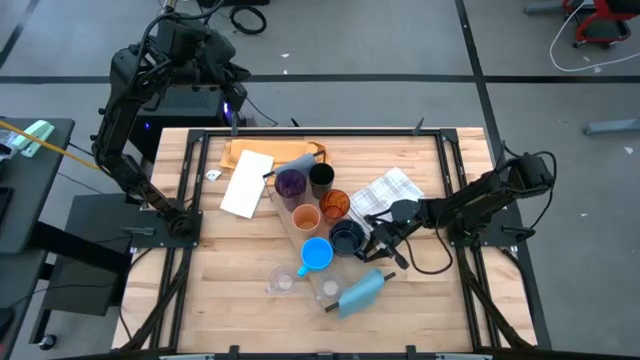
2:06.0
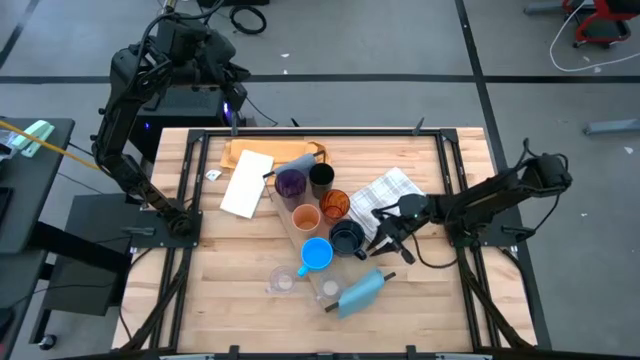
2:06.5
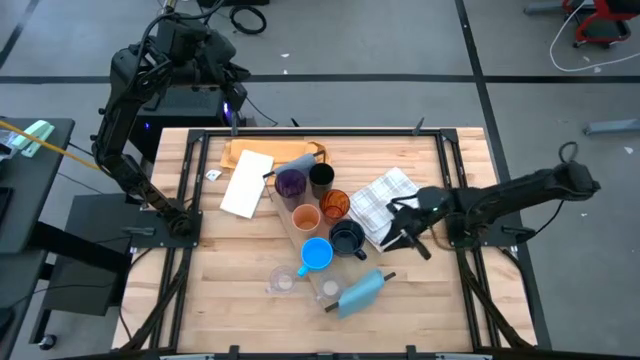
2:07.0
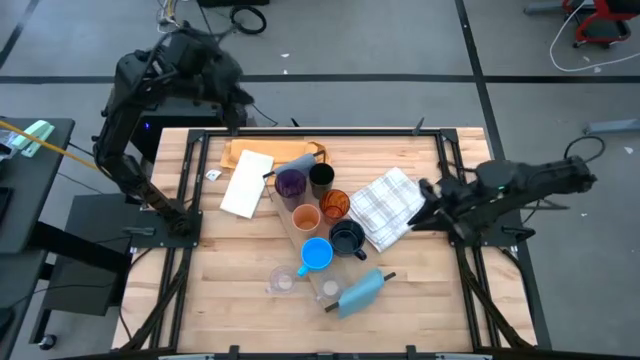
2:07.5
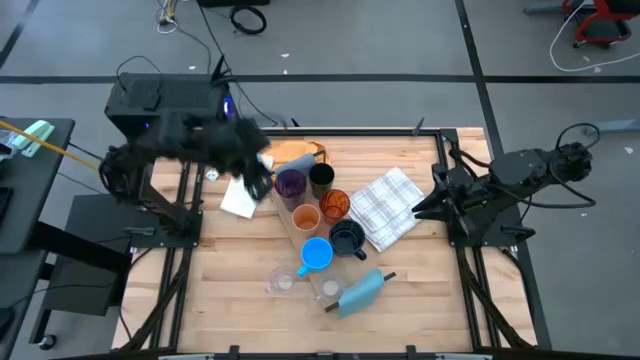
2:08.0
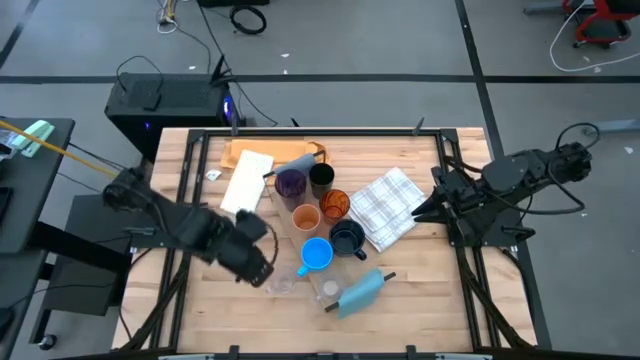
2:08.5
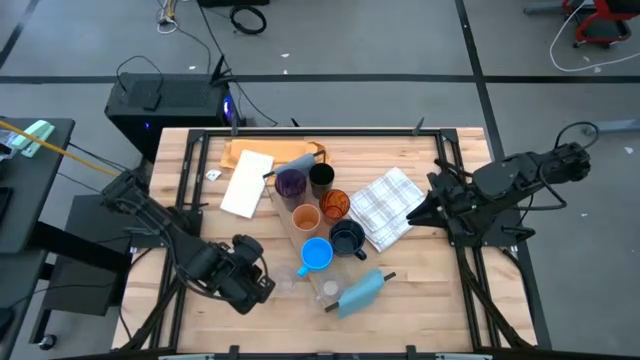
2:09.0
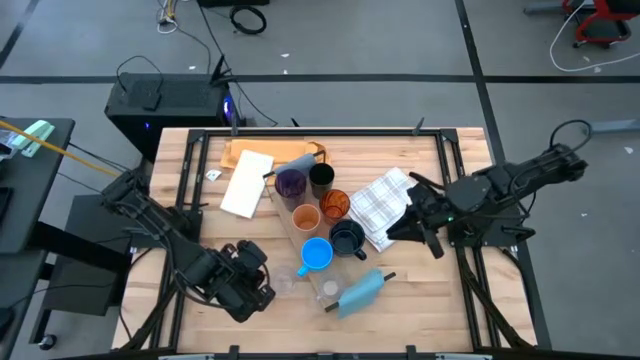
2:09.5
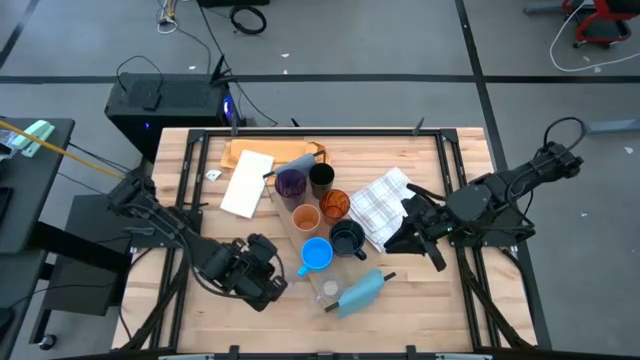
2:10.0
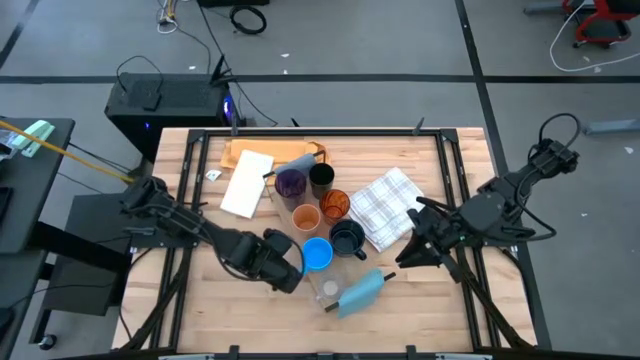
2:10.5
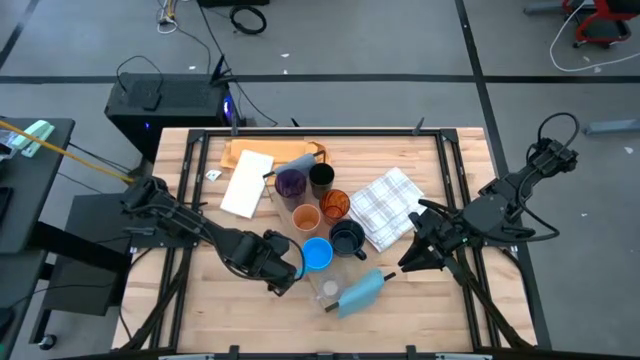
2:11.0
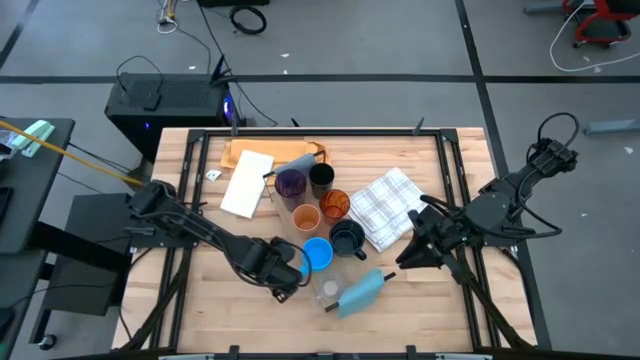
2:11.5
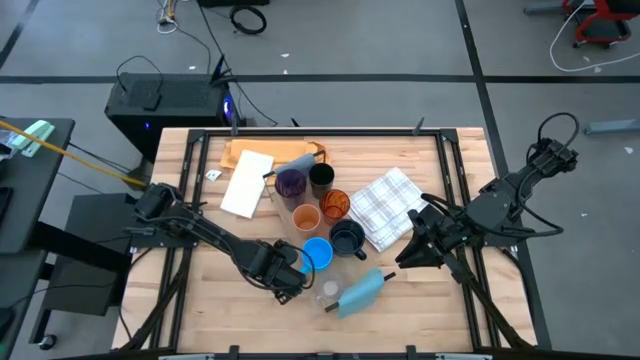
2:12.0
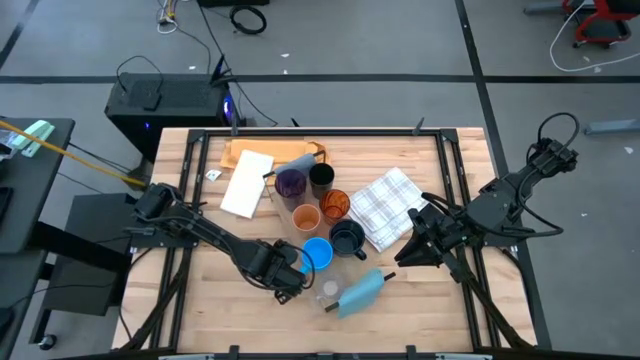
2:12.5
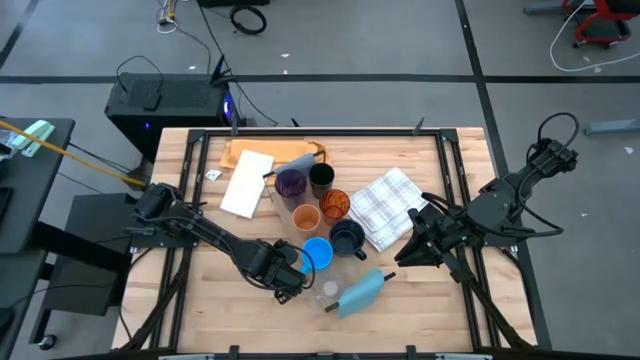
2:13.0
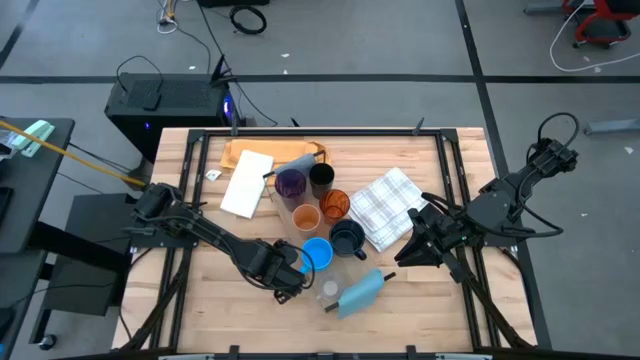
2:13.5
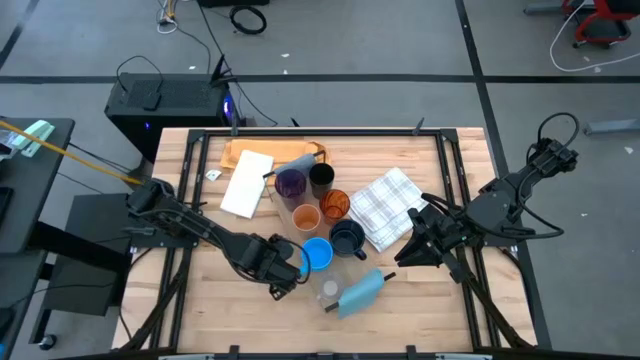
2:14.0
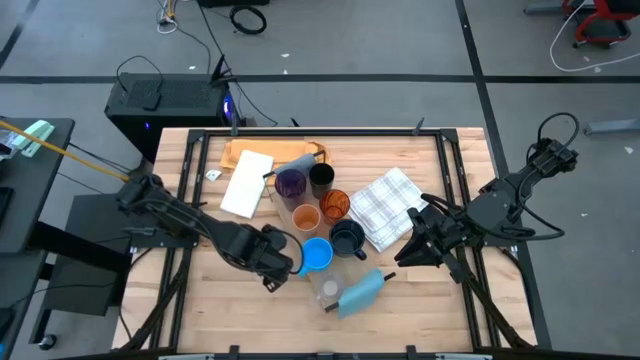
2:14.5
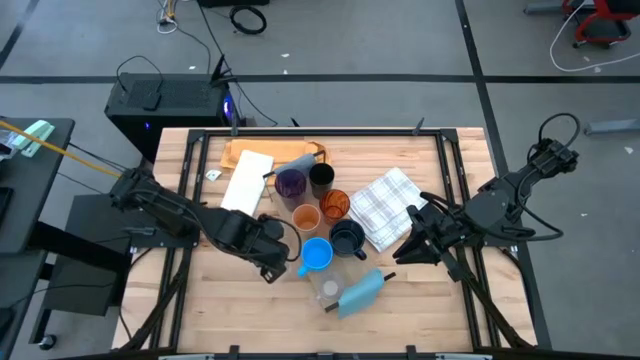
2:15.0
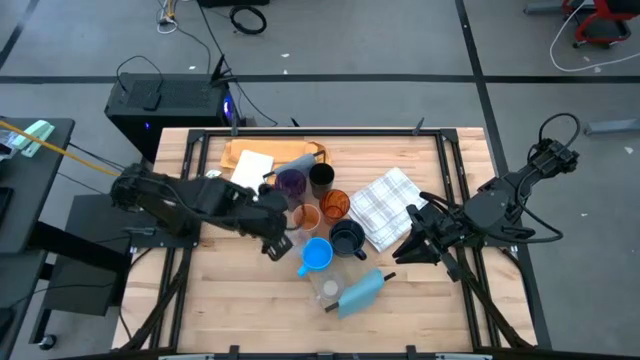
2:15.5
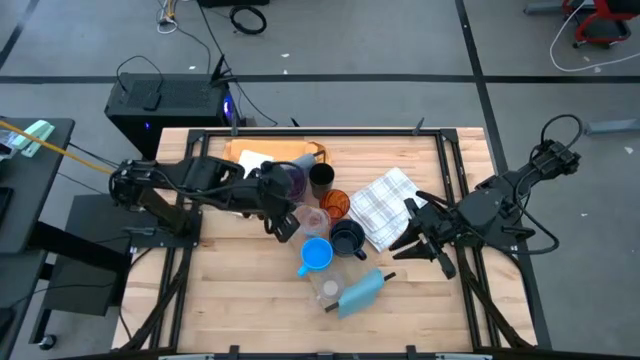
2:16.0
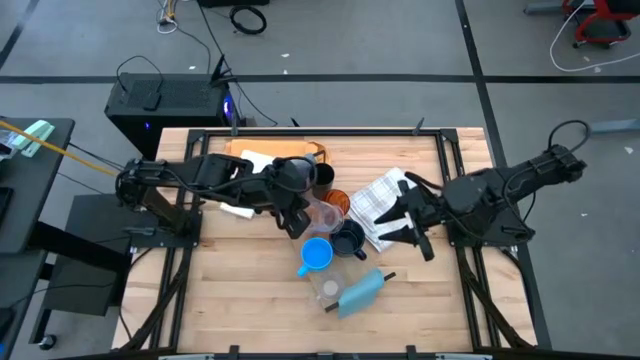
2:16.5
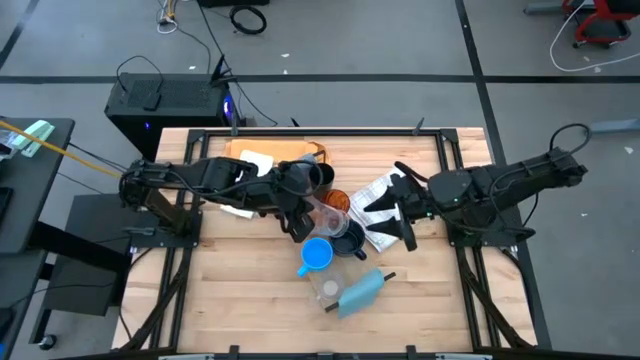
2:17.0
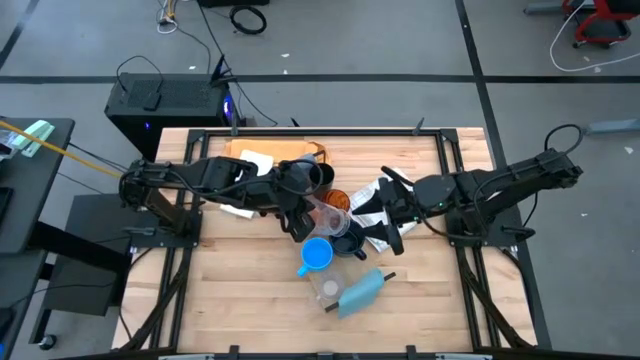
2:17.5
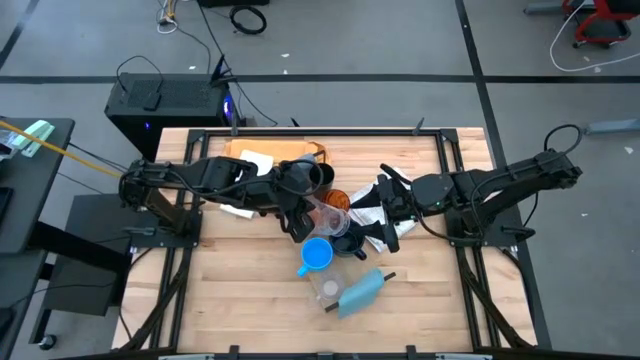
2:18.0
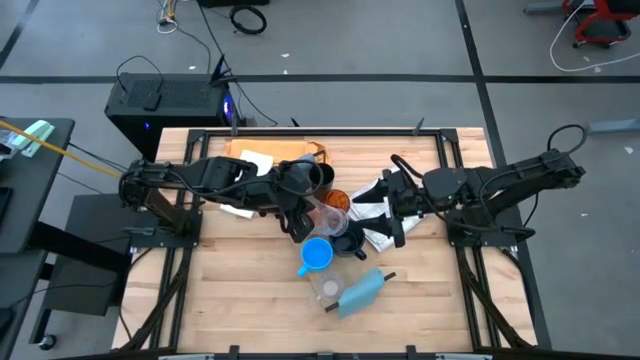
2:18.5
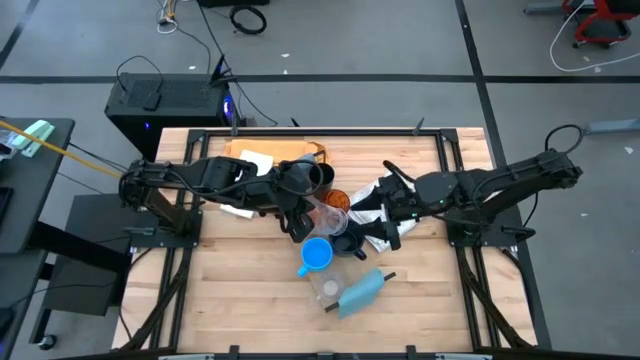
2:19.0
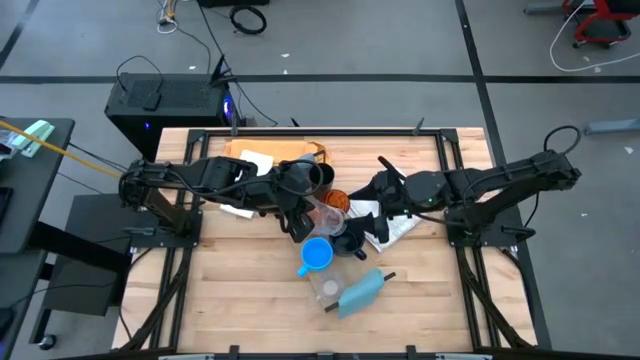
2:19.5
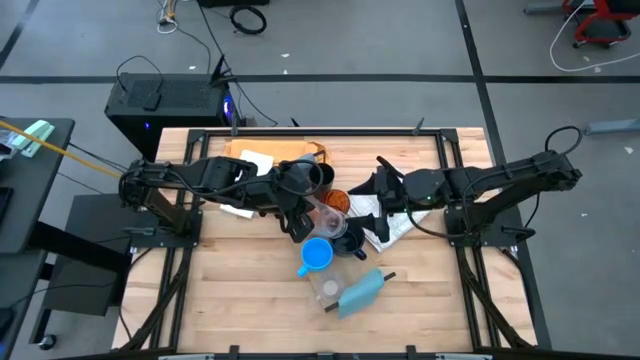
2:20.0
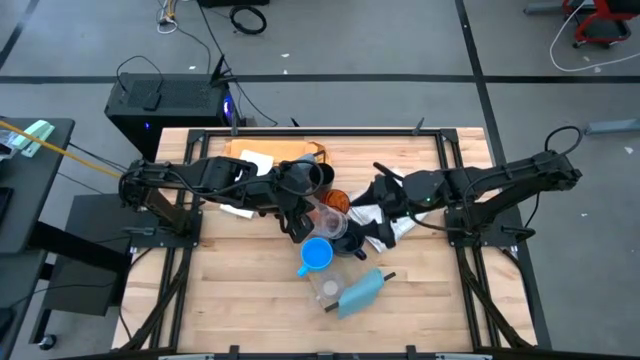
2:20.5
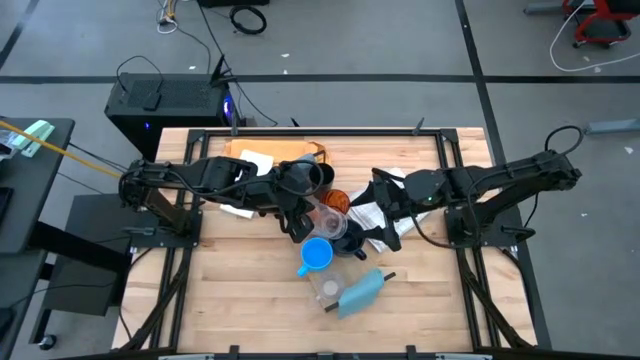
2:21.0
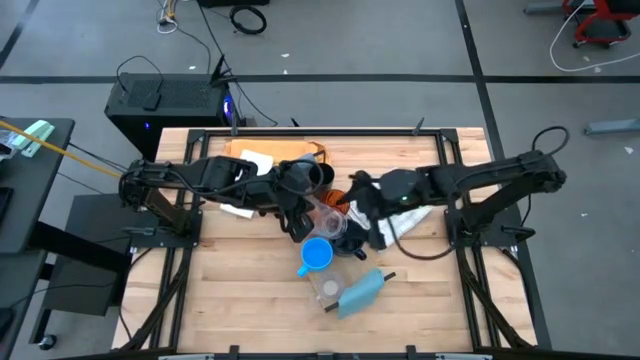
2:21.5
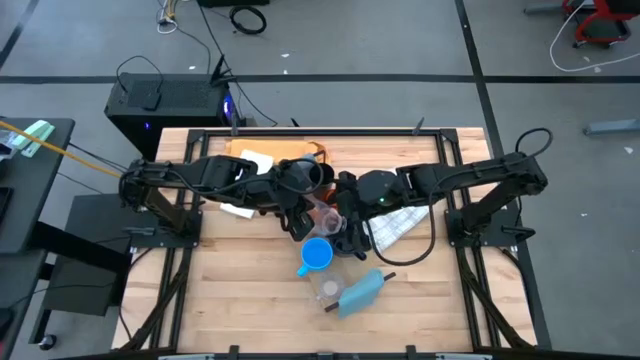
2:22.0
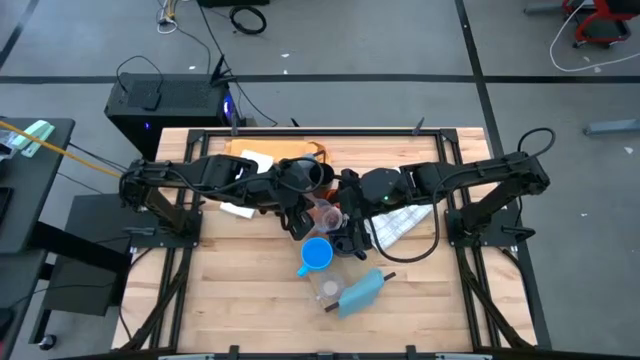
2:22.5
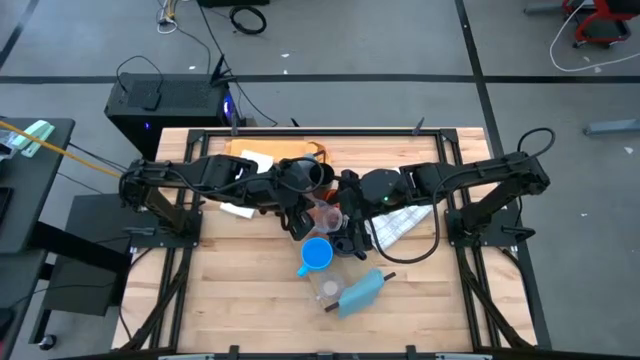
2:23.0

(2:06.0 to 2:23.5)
Task: Stack small to large cups/mugs on shelf
Put the transparent mug on the shelf

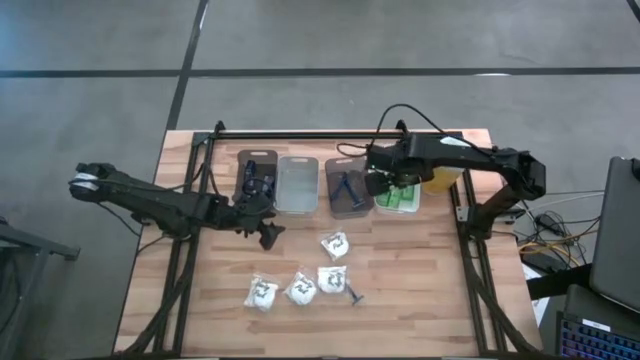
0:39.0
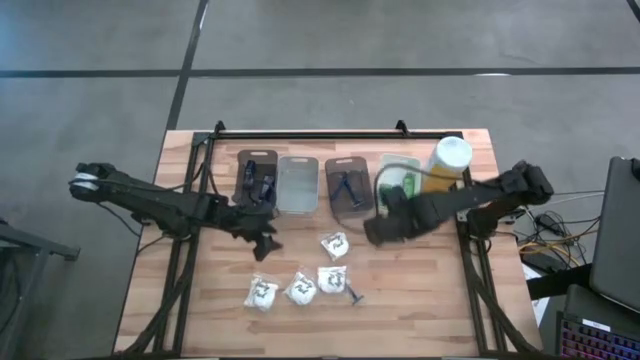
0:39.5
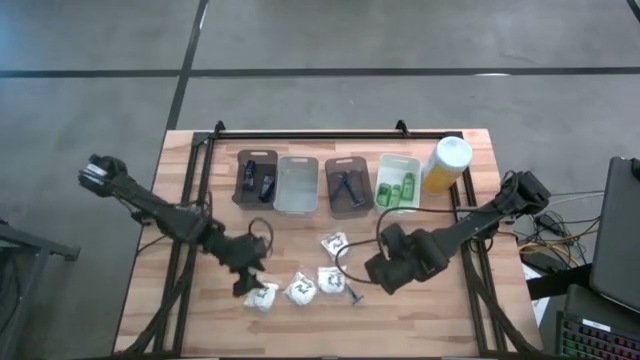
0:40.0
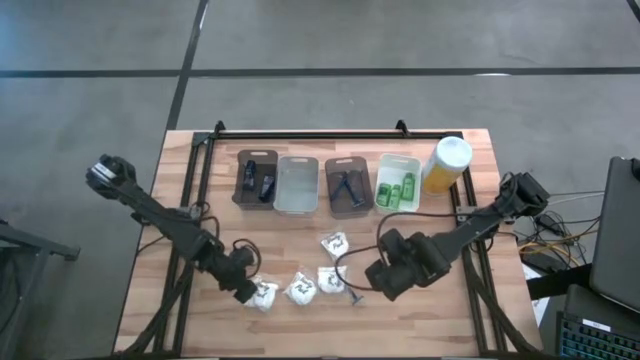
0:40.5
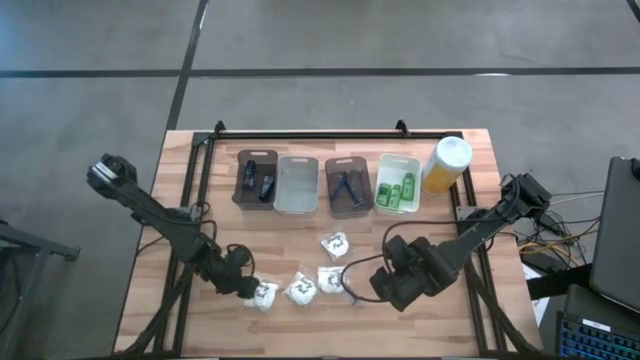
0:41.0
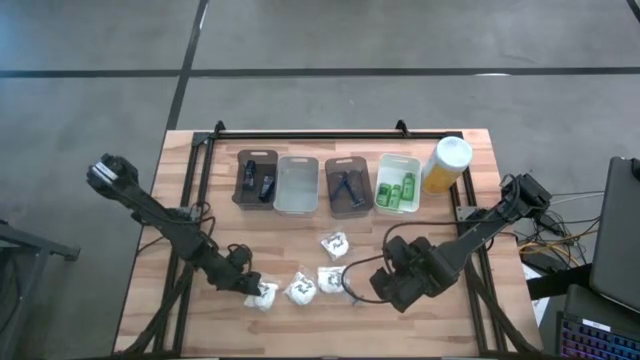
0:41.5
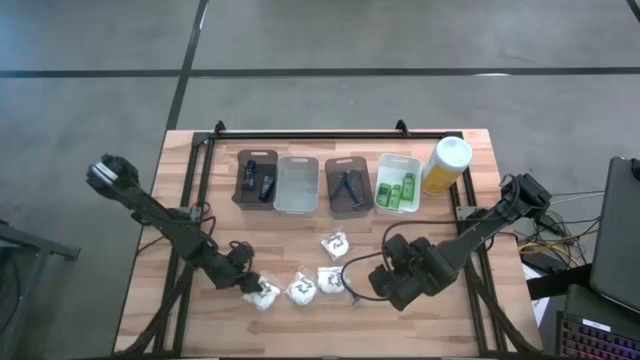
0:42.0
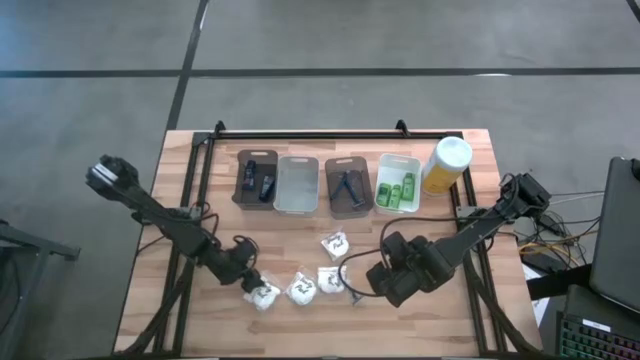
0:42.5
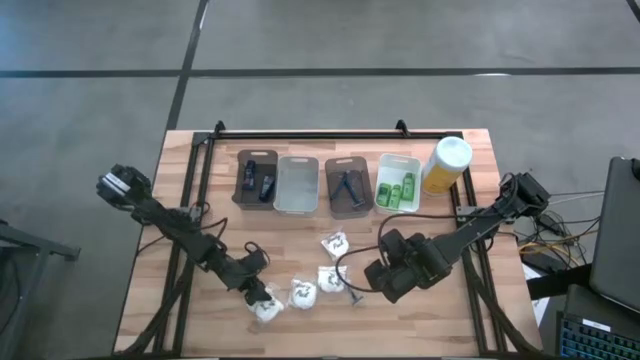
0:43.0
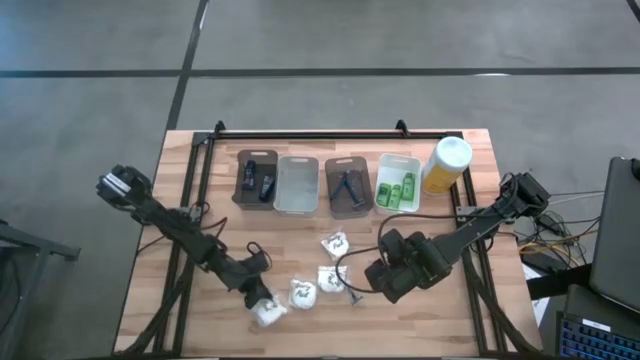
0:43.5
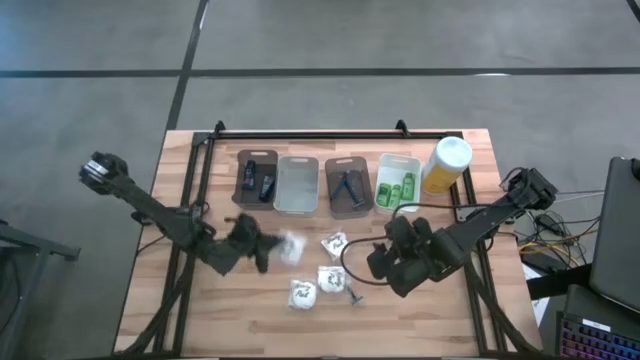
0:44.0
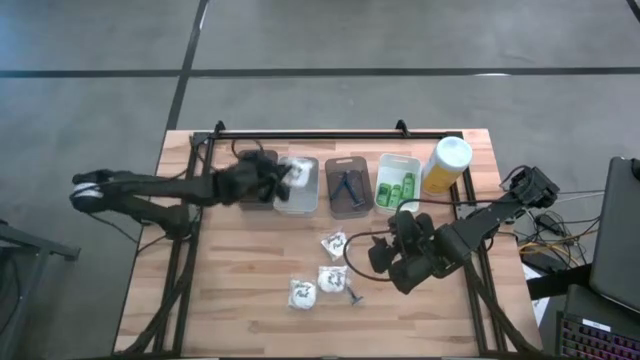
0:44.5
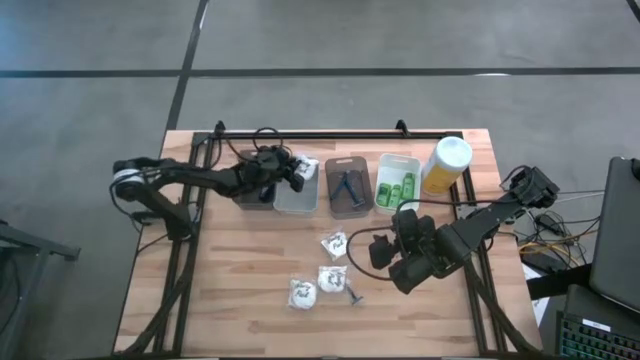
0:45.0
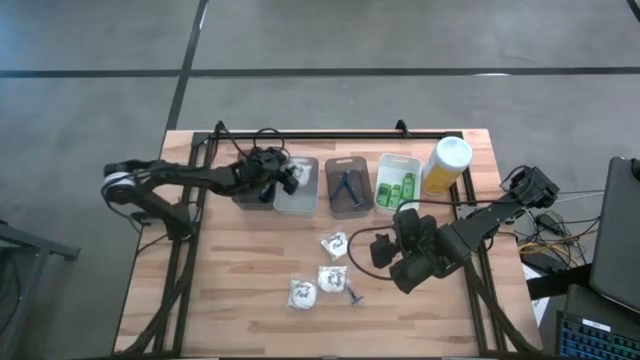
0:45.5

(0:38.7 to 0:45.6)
Task: Pick & Place Travel size toiletries
Put the white cotton pack into the gray bin
